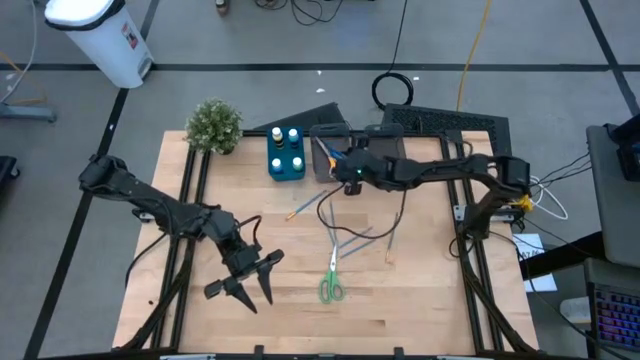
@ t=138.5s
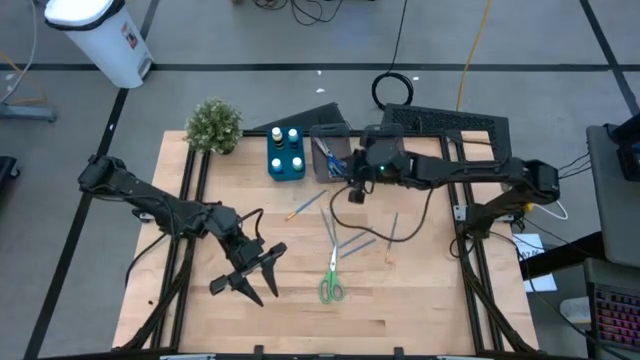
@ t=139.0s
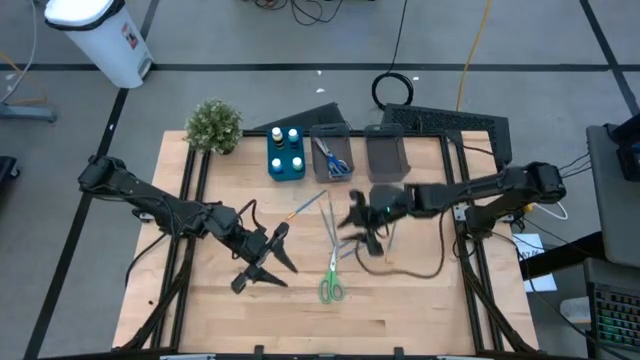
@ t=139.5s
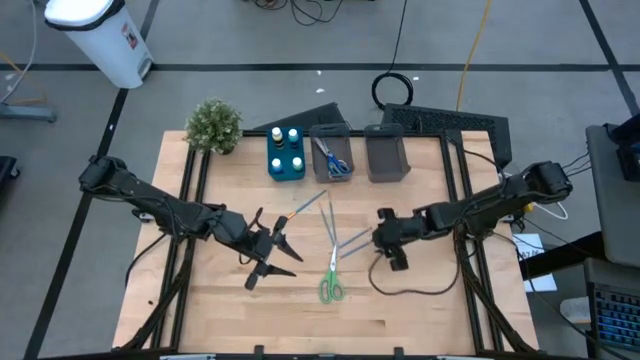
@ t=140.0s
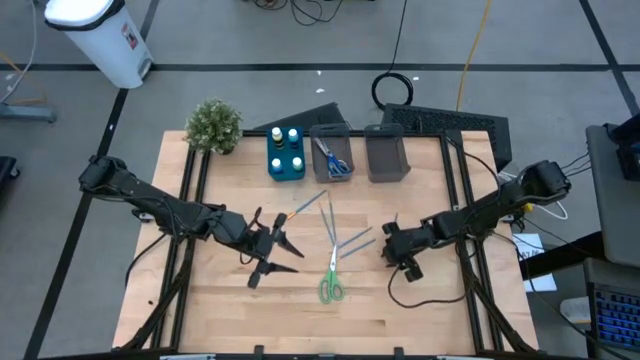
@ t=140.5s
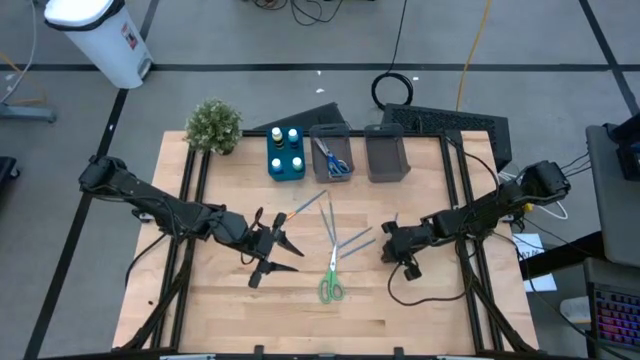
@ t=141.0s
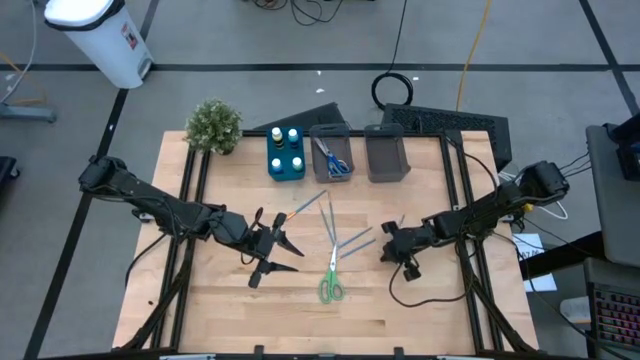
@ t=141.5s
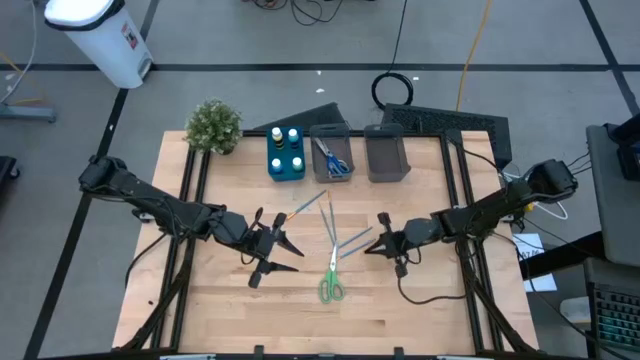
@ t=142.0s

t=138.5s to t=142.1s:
Task: Pick & Place Paint Supplies
Put the blue paint brush into the right black bin

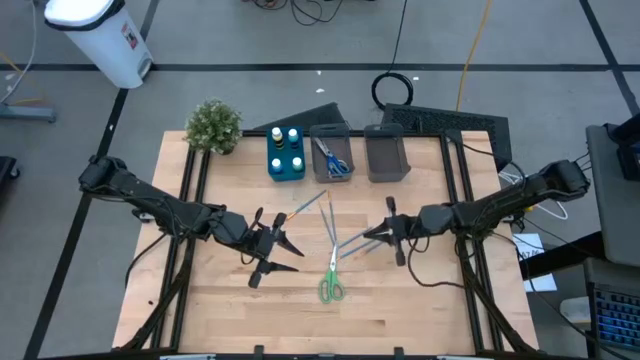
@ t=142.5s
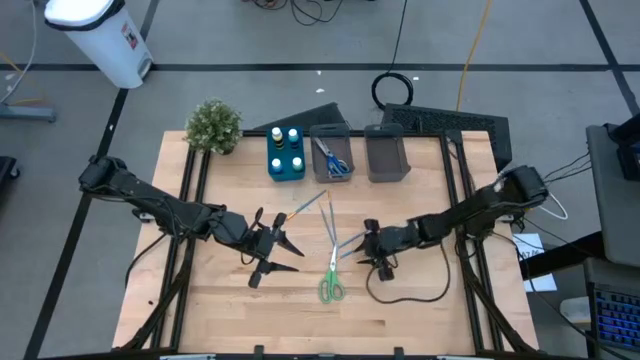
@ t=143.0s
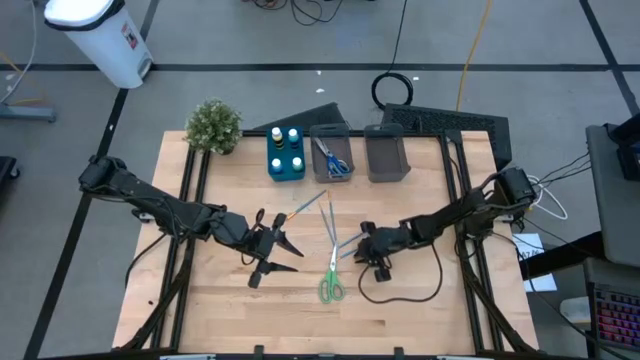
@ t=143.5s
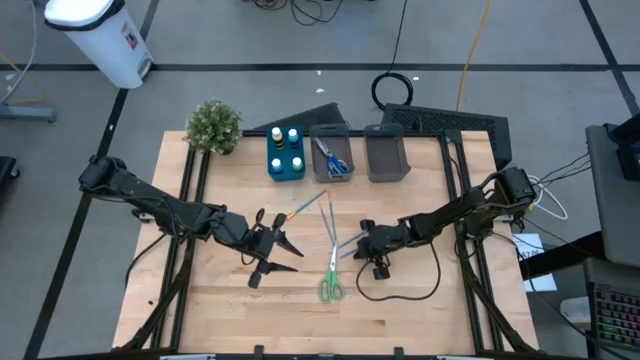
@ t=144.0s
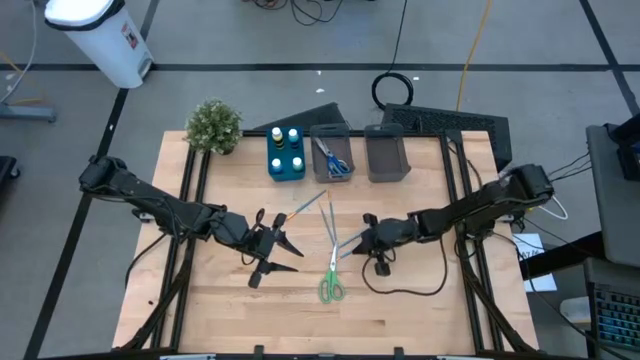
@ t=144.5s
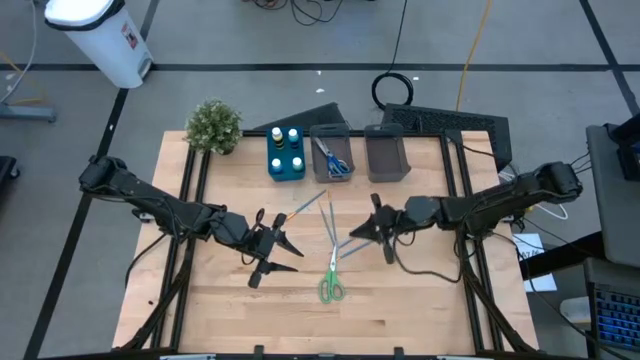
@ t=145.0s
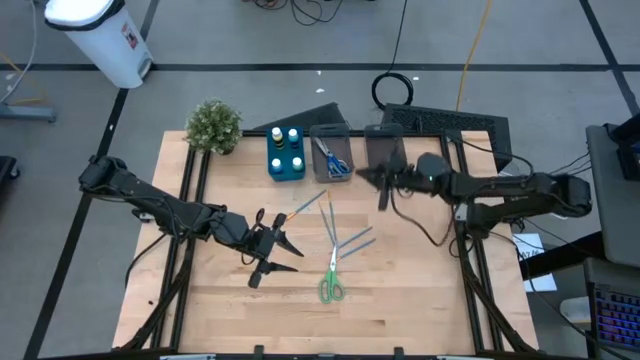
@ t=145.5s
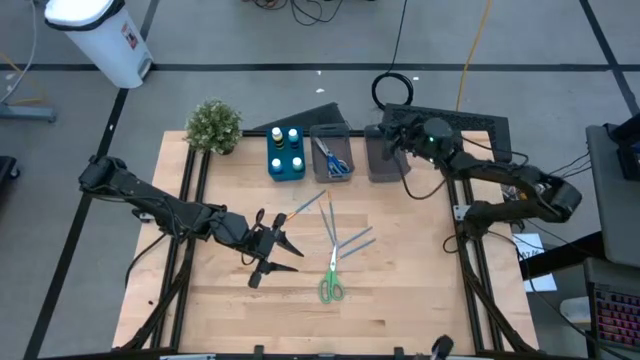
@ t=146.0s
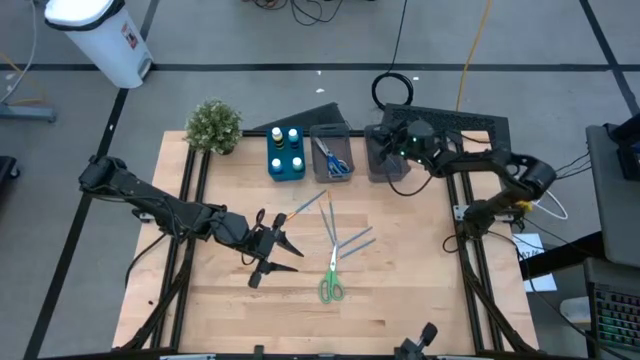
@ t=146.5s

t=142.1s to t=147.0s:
Put the blue paint brush into the right black bin

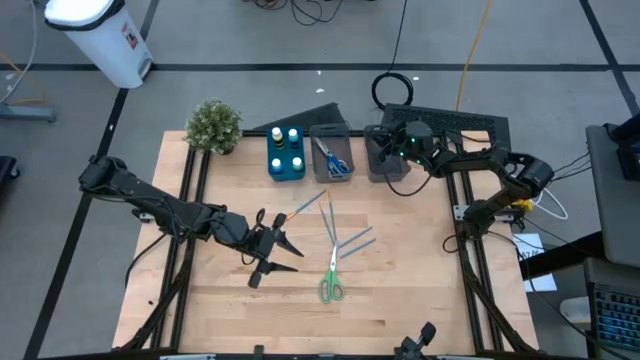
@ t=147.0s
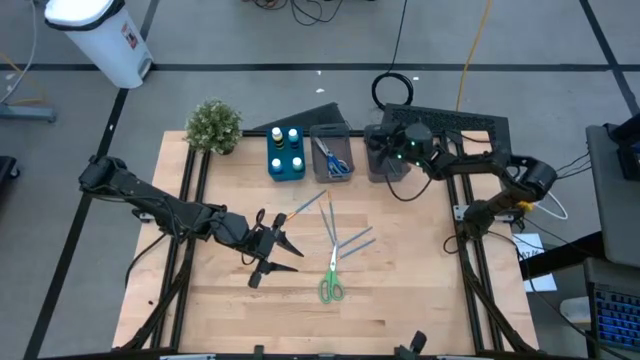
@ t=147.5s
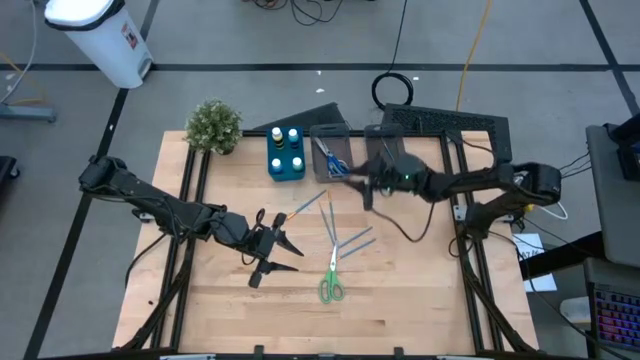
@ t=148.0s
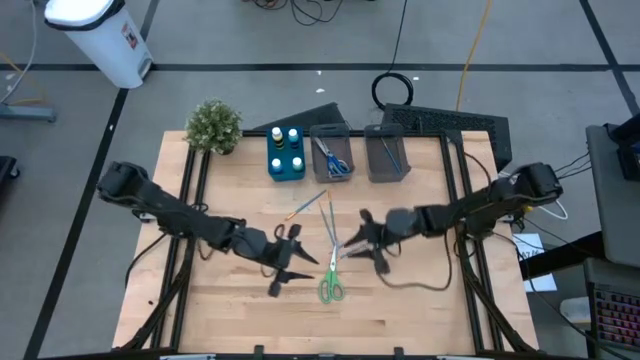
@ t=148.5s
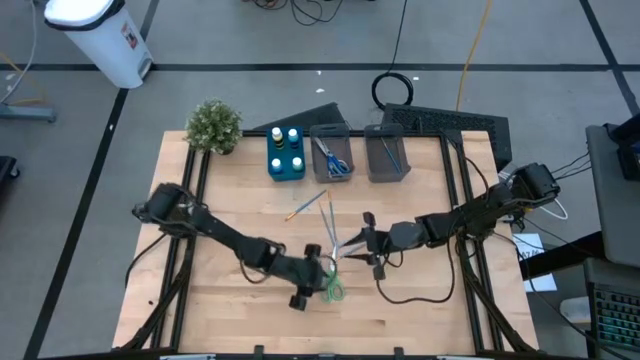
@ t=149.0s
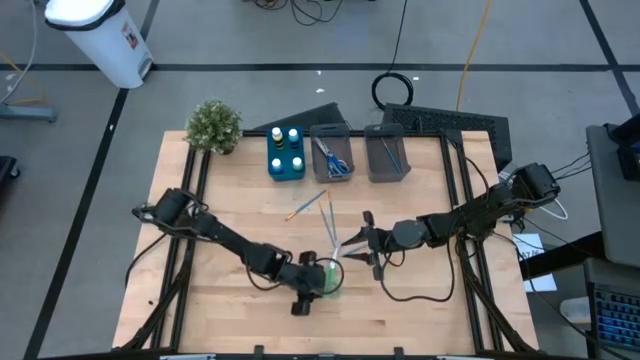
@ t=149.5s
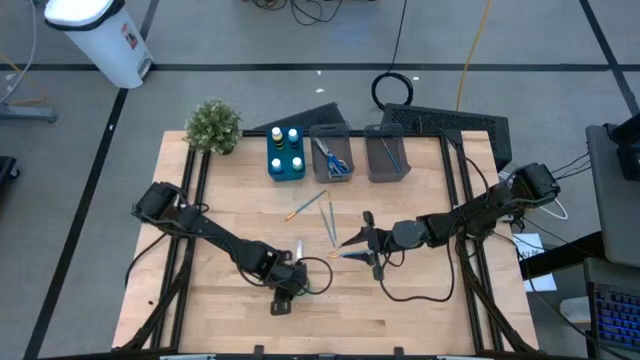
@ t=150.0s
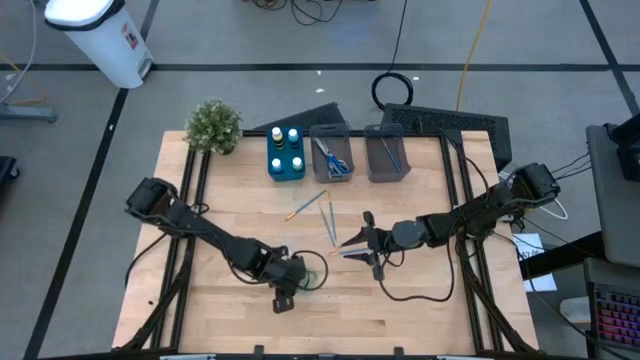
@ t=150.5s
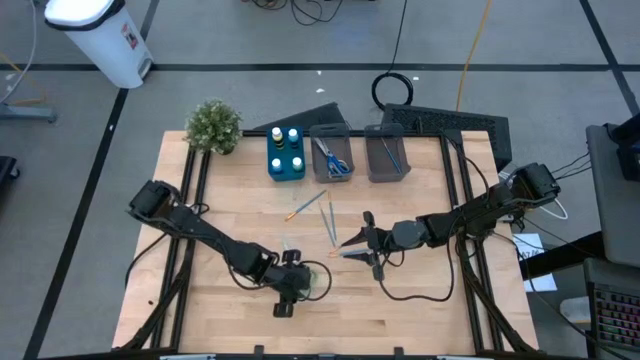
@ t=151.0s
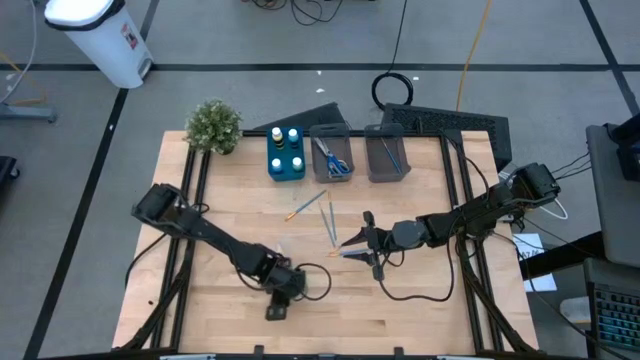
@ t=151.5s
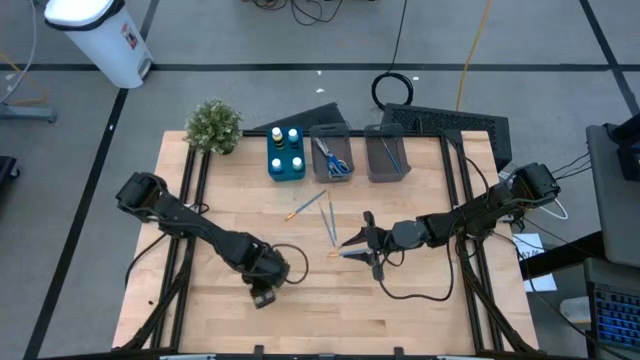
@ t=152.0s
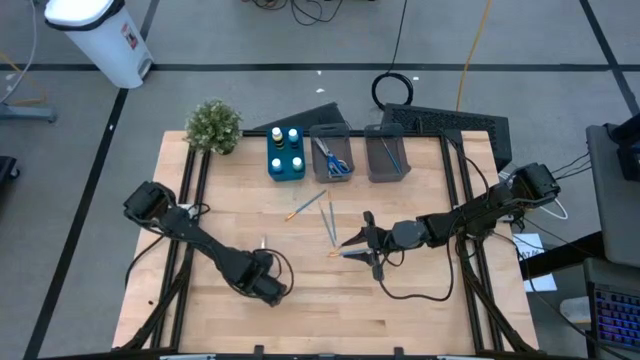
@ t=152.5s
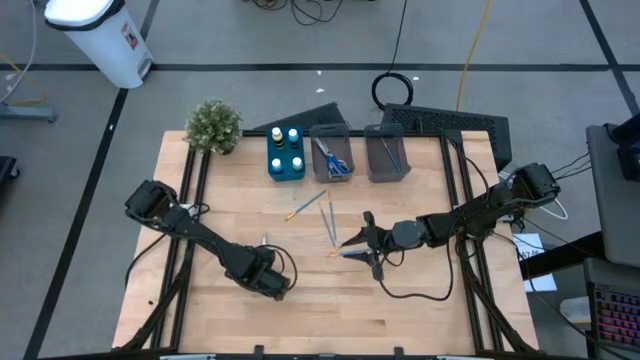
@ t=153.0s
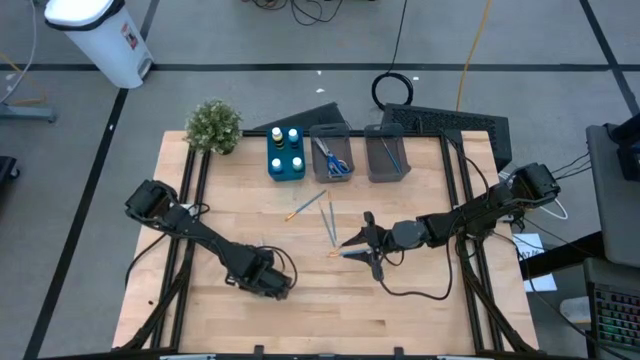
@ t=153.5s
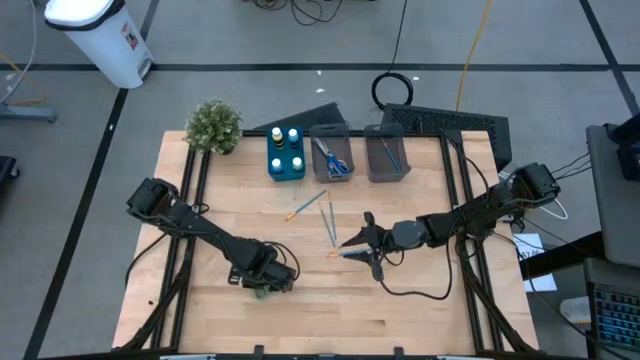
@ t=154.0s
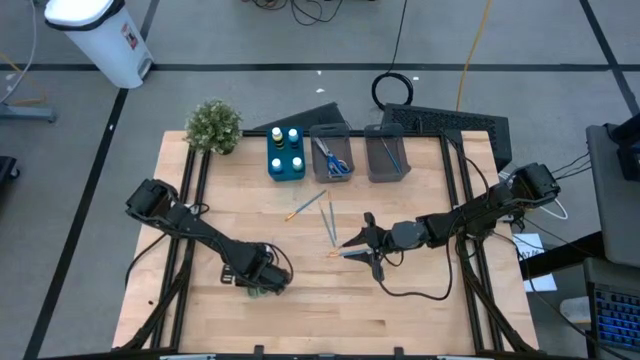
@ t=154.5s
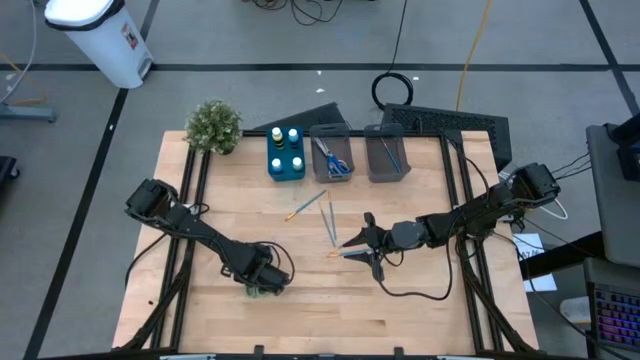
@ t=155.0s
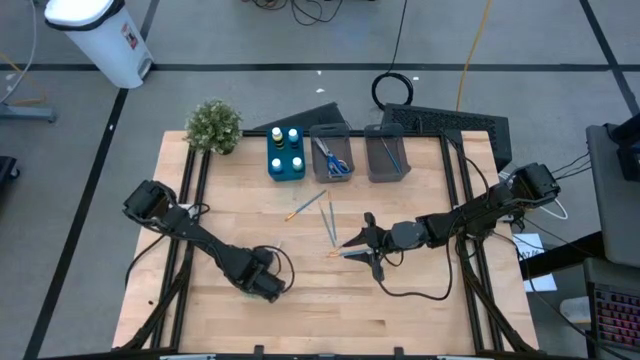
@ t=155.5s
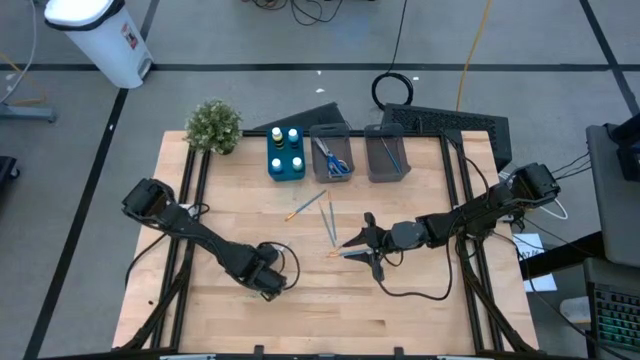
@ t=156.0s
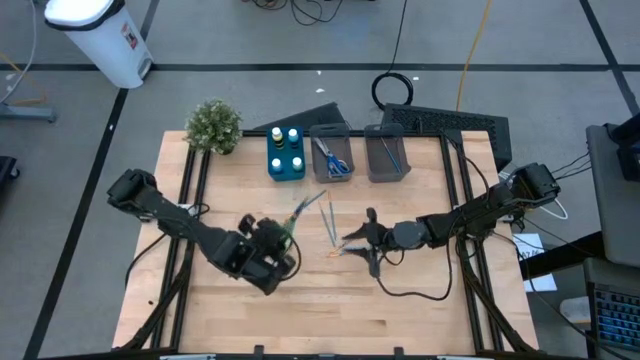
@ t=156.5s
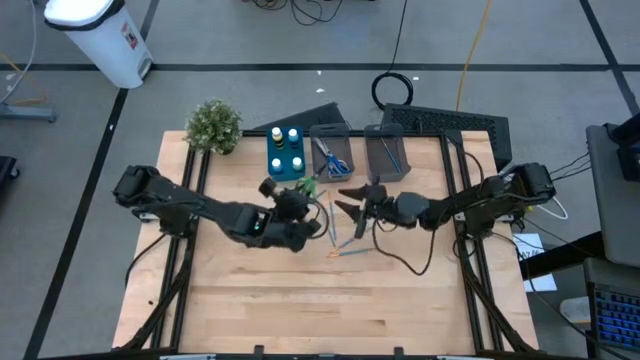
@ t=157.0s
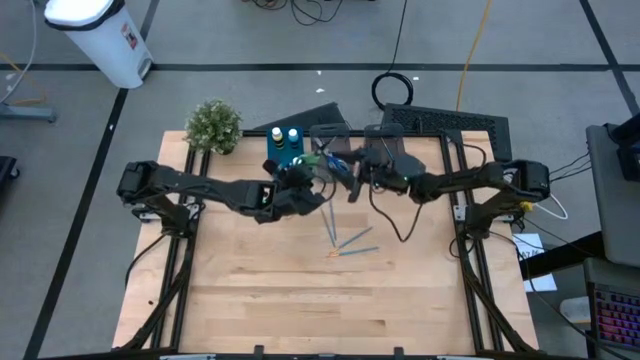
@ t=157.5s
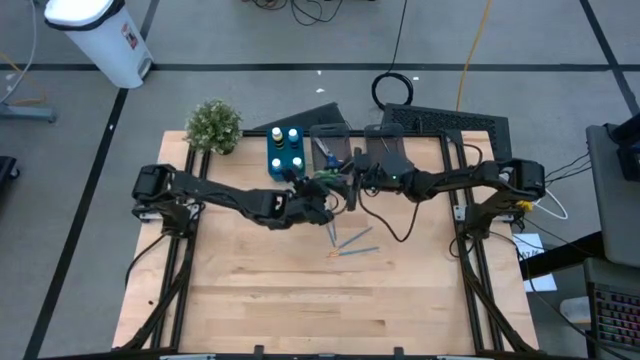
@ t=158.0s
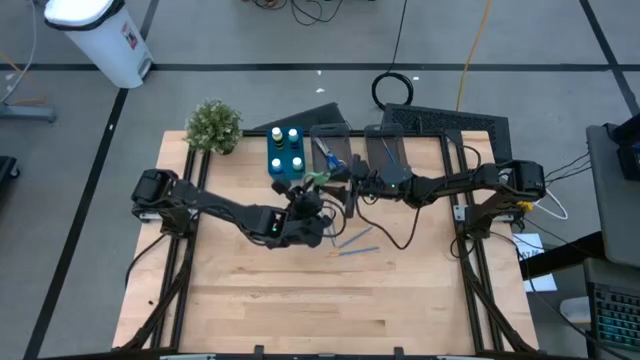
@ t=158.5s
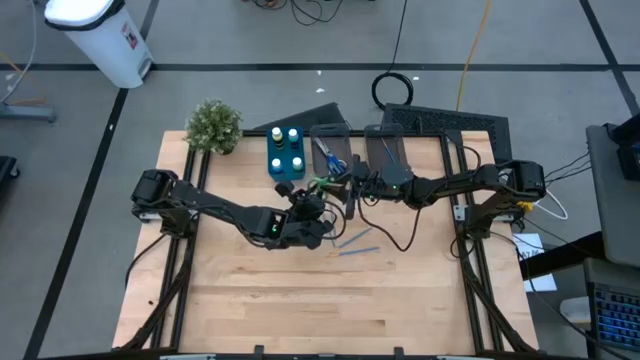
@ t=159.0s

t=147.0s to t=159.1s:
Put the green scissors into the left black bin

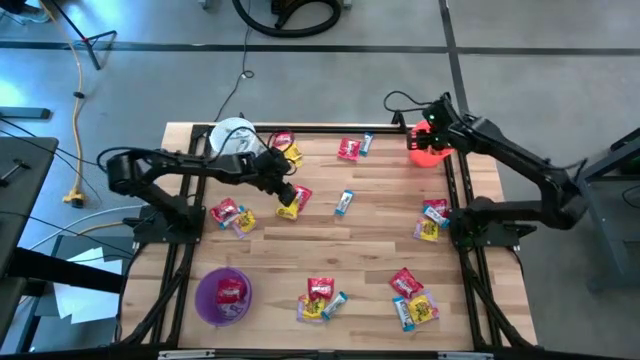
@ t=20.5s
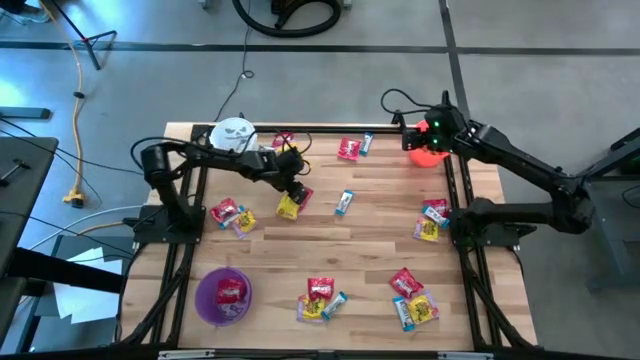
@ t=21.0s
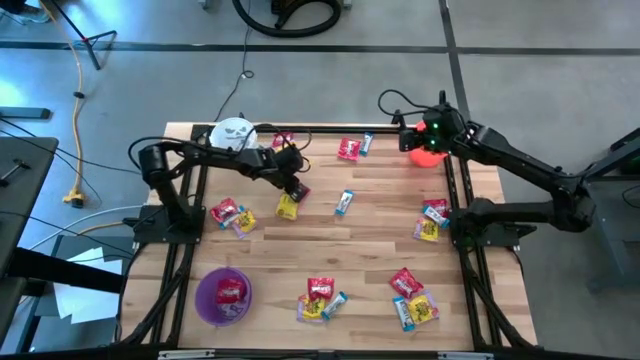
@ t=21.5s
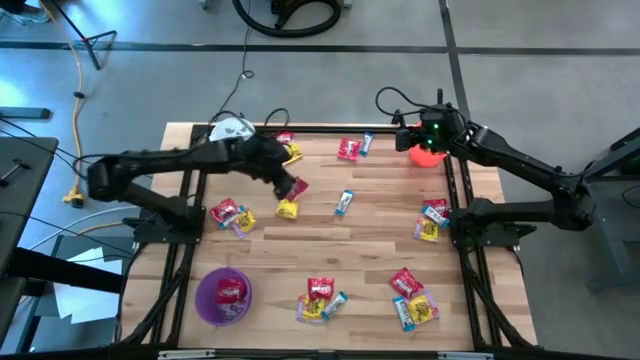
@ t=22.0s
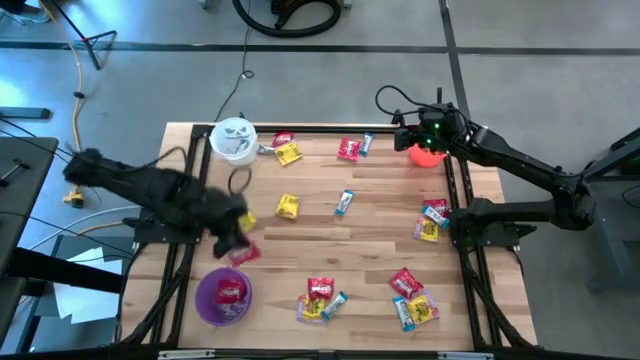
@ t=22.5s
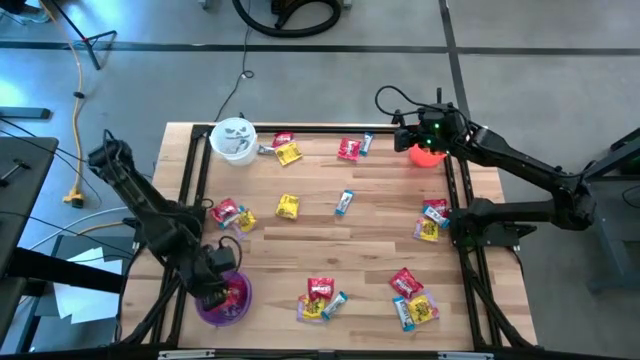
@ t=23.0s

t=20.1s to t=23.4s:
Task: Sort candy
Put the red candy into the purple bucket
